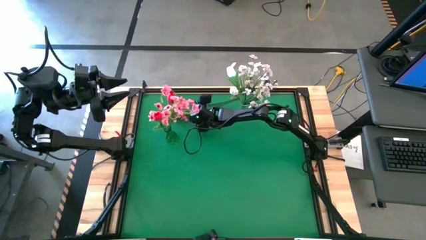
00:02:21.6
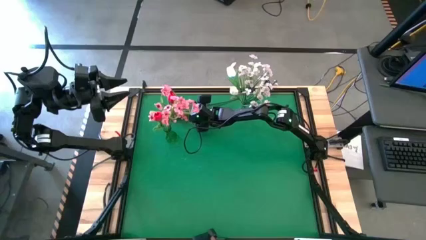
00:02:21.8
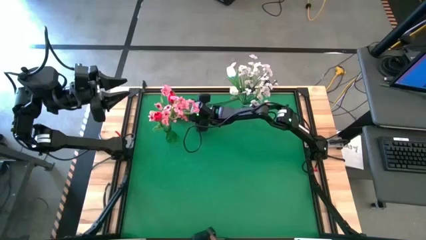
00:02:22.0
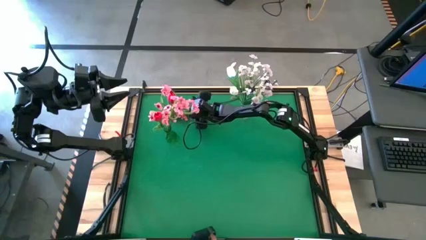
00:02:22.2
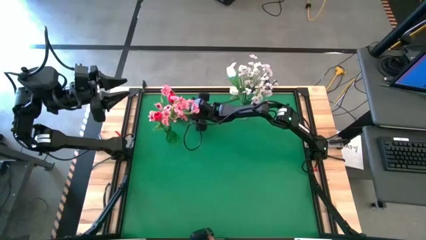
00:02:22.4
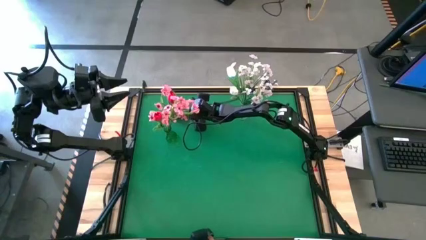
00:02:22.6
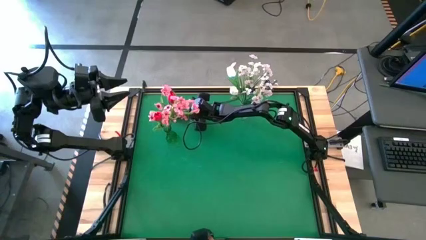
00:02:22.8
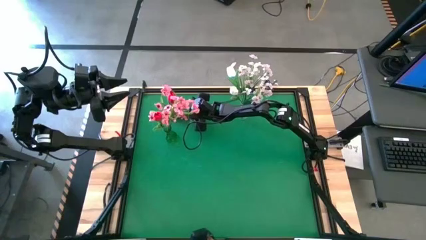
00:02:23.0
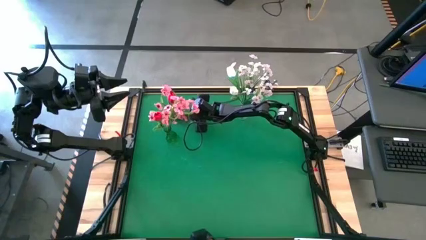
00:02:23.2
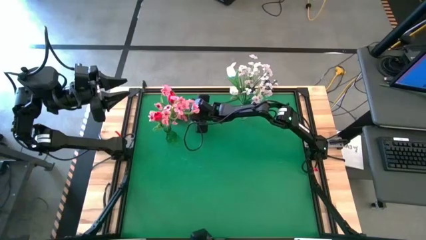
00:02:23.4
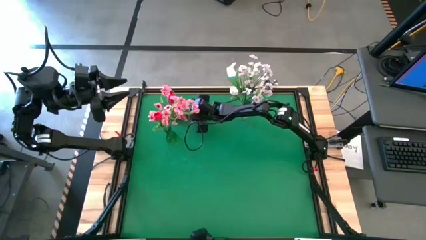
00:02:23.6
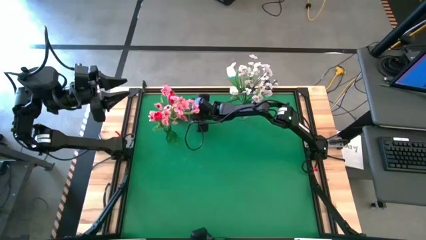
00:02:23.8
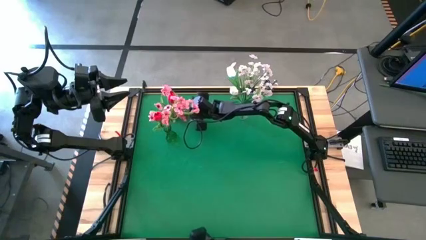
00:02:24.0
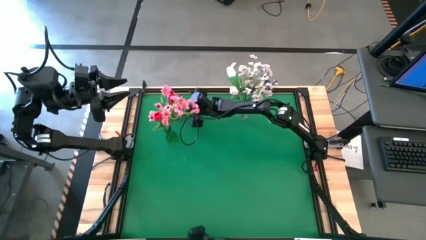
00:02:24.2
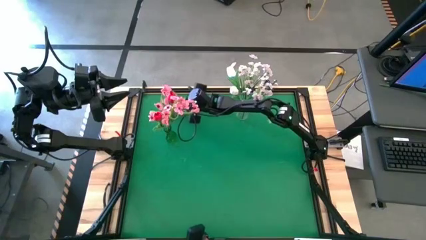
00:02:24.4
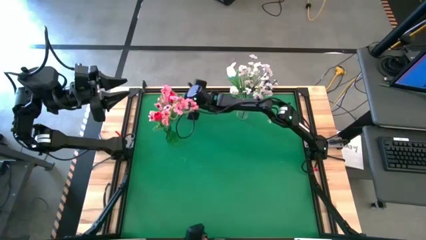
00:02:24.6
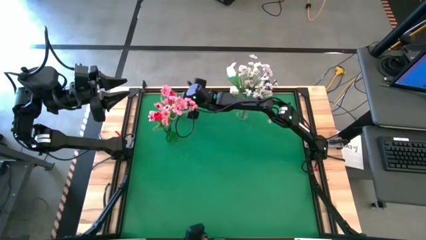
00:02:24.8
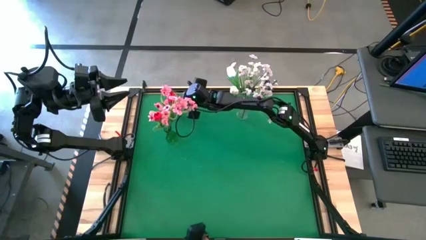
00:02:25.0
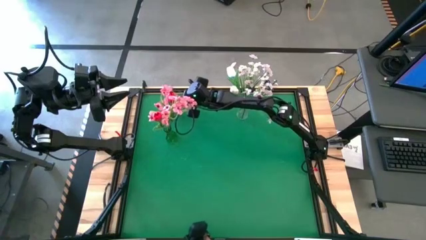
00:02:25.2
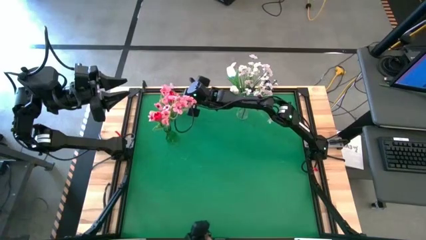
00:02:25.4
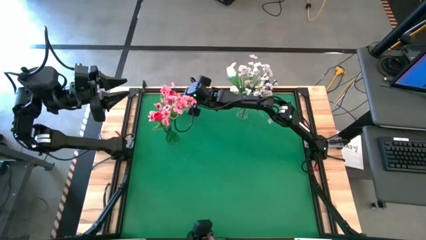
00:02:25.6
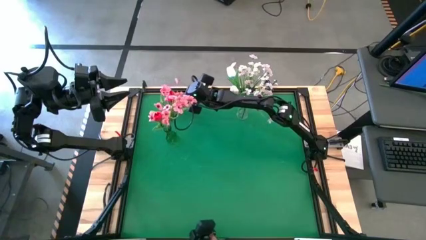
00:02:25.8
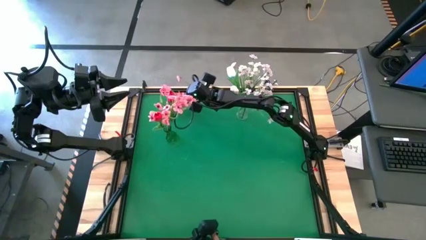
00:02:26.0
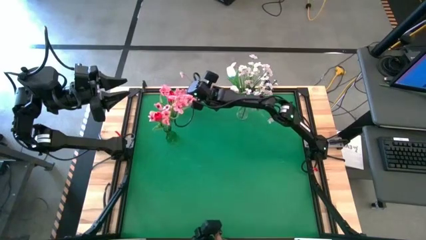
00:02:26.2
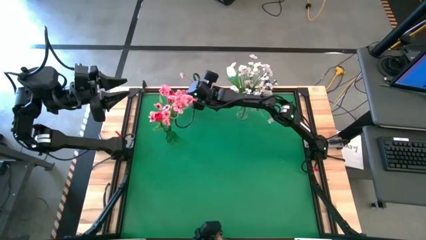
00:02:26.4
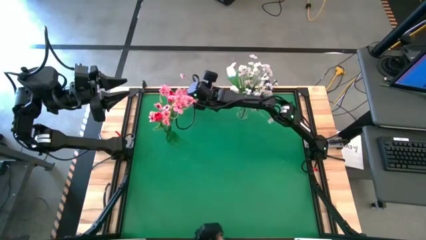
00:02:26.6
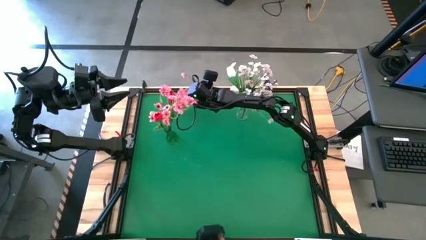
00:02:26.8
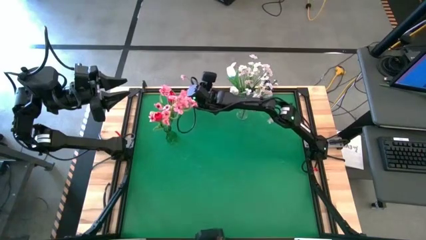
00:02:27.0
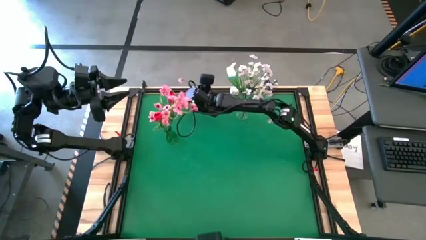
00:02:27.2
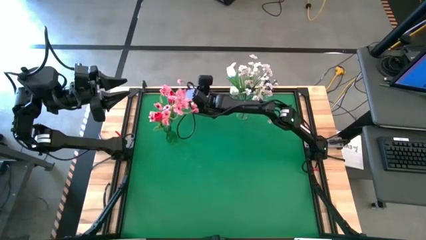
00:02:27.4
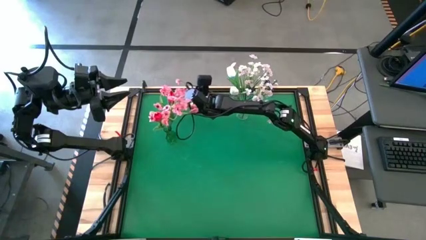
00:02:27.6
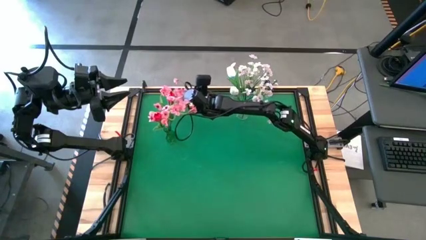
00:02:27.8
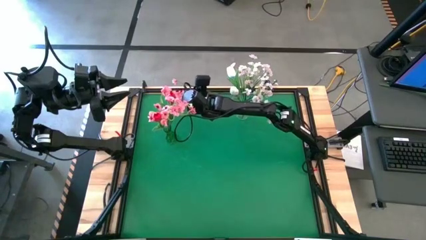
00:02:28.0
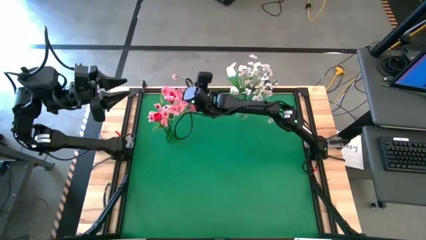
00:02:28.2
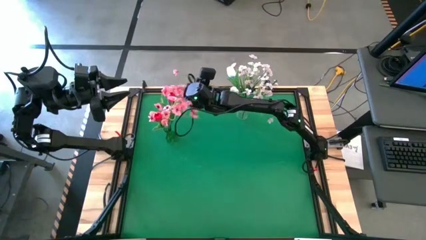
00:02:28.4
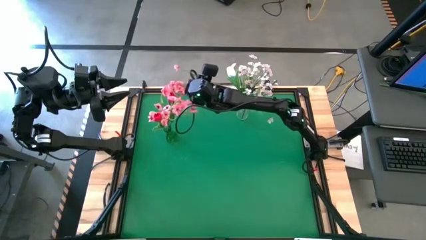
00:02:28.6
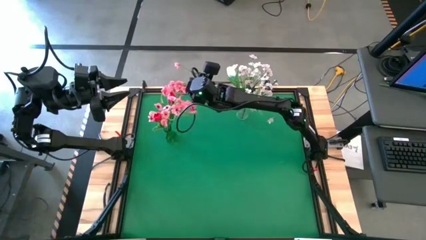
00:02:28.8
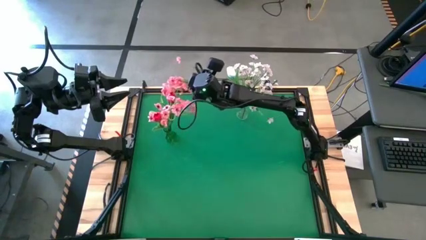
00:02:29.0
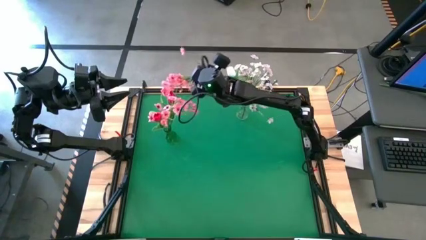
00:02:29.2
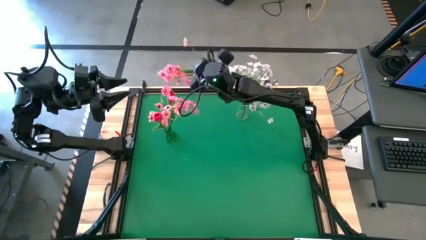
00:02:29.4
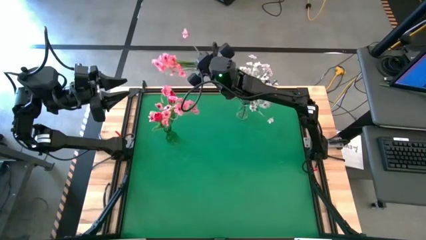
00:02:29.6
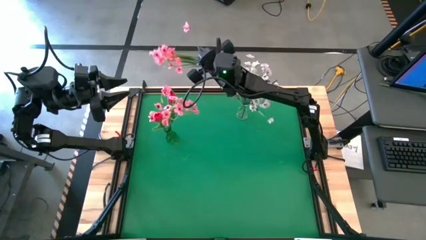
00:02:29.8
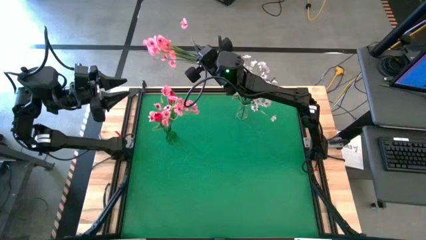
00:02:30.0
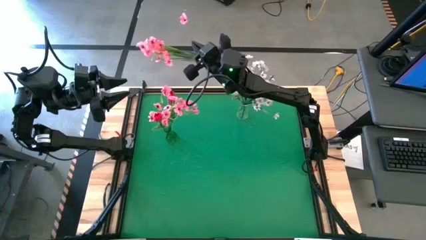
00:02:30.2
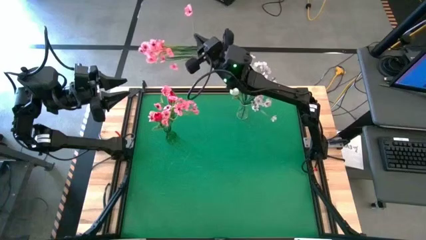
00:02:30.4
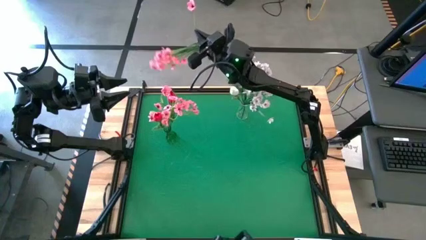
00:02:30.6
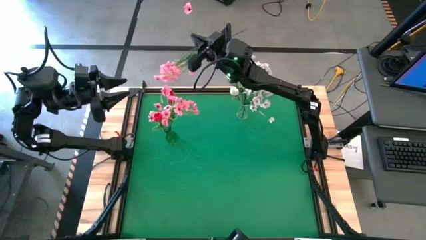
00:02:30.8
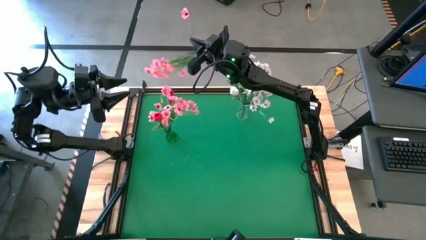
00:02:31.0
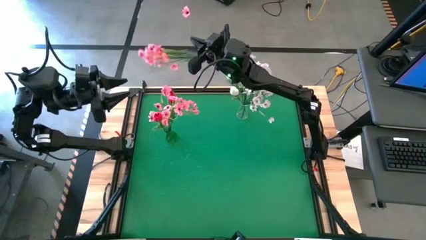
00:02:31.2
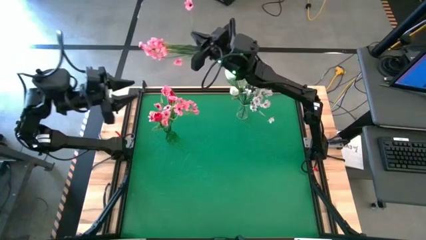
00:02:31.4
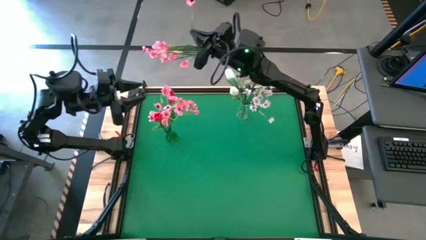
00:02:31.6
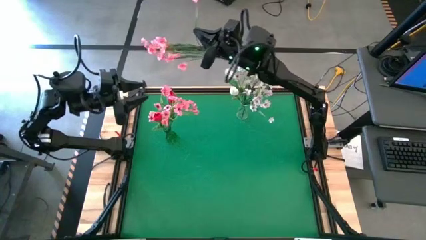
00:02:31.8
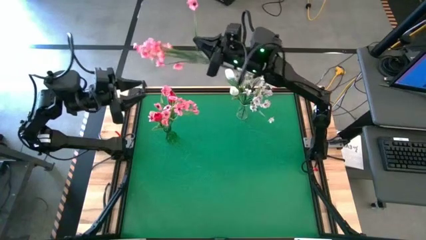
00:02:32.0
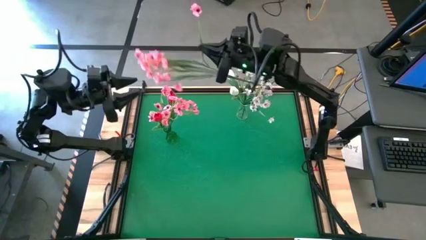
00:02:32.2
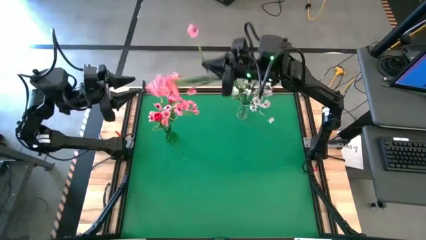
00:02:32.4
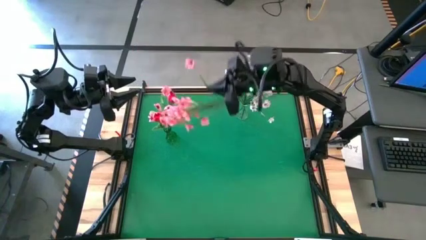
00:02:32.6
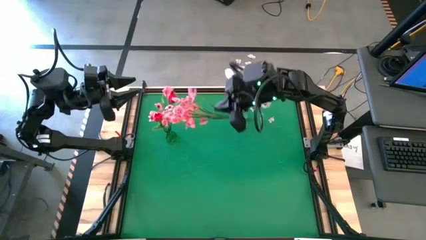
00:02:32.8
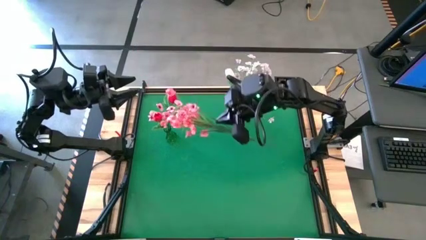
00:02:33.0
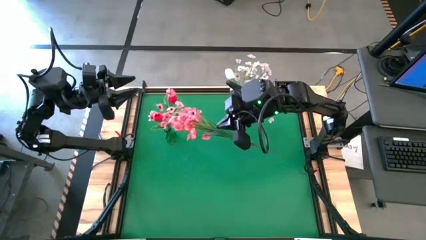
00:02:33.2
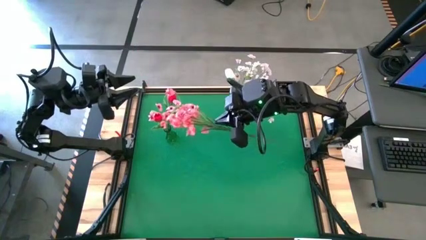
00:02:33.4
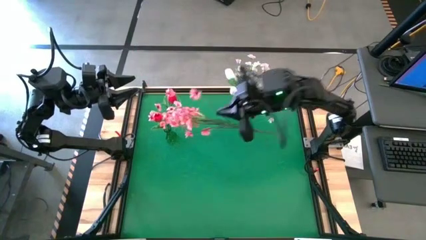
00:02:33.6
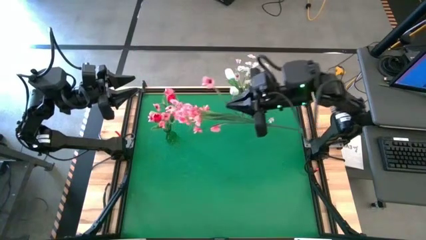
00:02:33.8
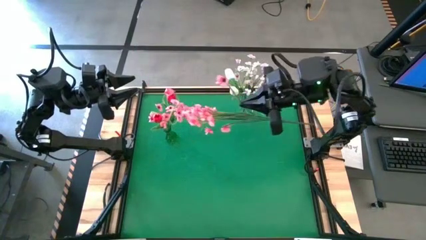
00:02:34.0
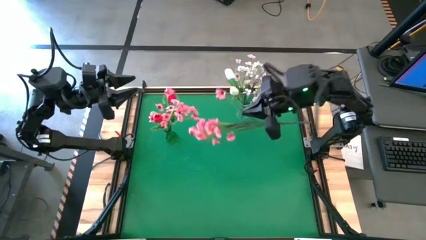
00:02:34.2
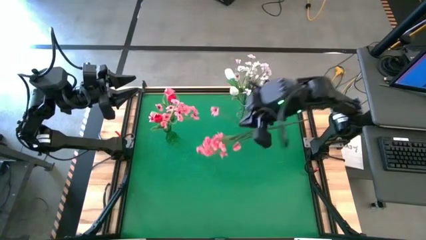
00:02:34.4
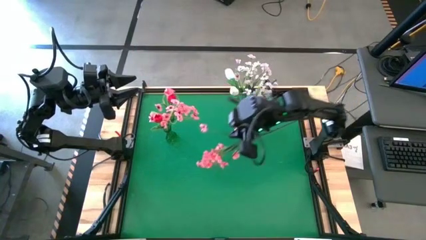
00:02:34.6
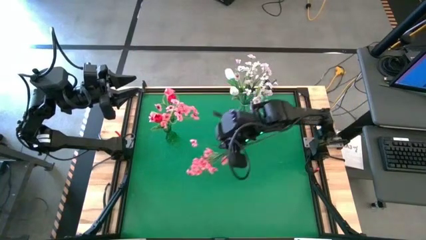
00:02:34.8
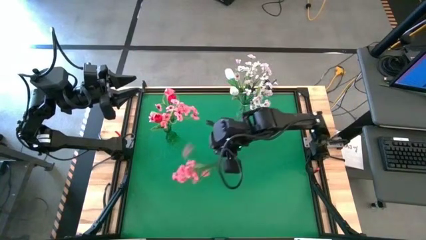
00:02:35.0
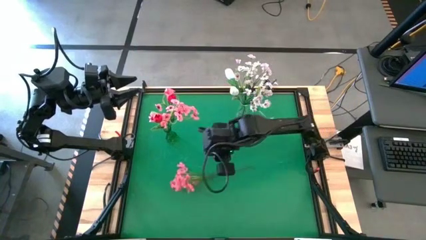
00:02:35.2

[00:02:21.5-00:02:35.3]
Task: Sort flowers into vase by color
Put the pink flowers into the green vase
